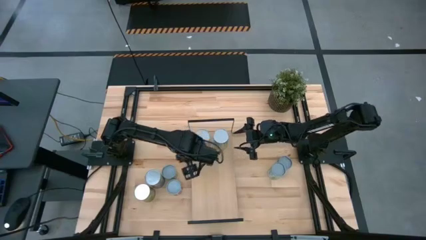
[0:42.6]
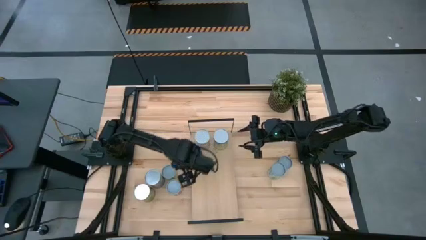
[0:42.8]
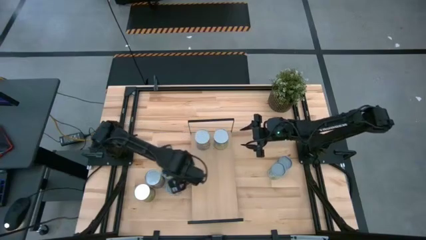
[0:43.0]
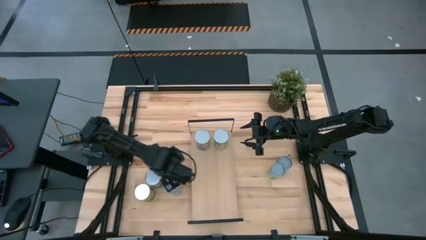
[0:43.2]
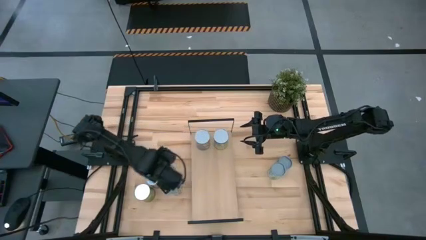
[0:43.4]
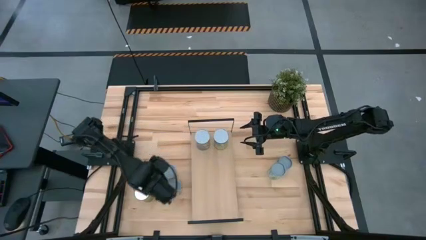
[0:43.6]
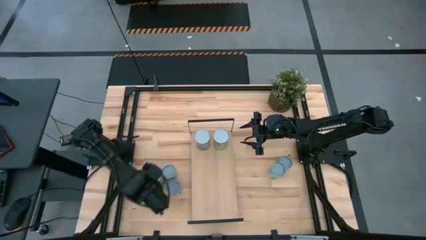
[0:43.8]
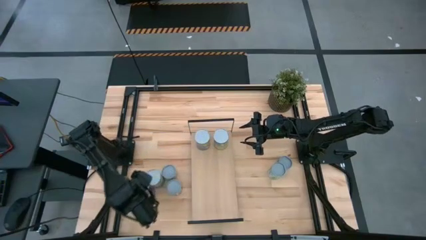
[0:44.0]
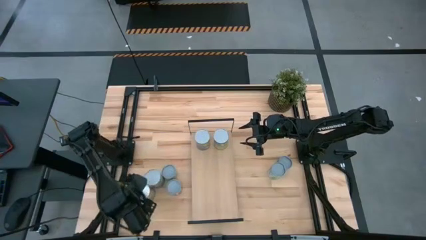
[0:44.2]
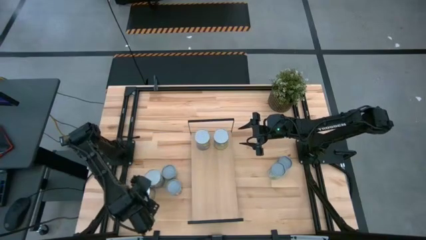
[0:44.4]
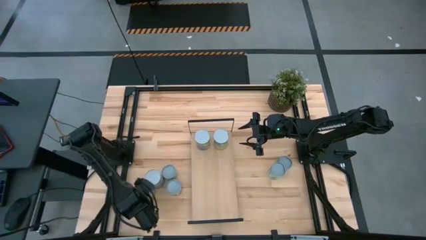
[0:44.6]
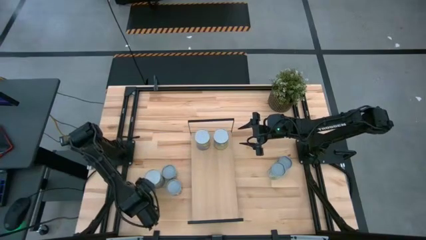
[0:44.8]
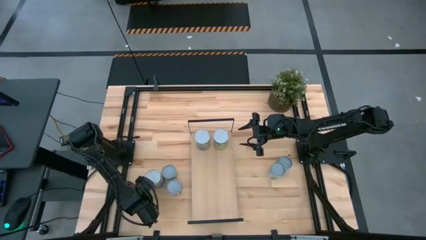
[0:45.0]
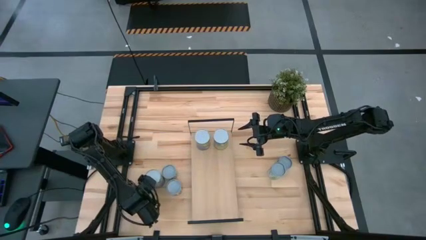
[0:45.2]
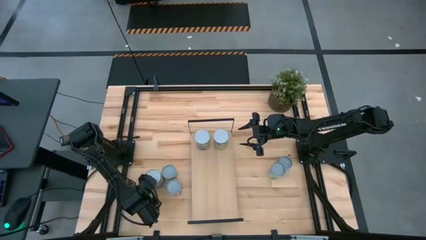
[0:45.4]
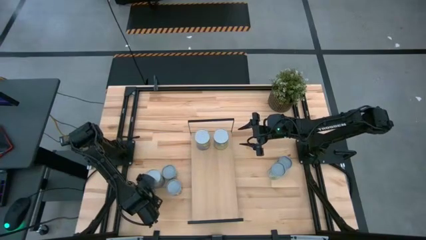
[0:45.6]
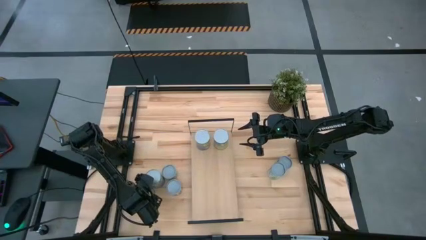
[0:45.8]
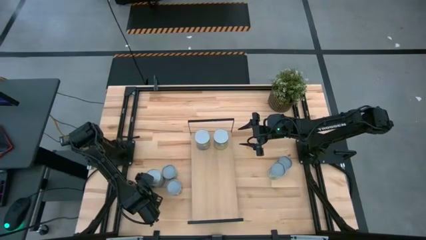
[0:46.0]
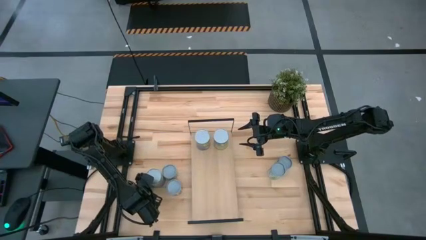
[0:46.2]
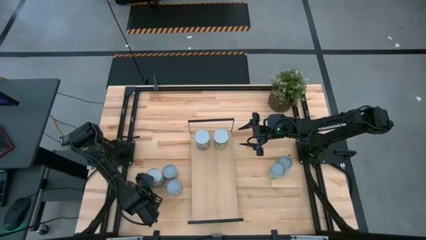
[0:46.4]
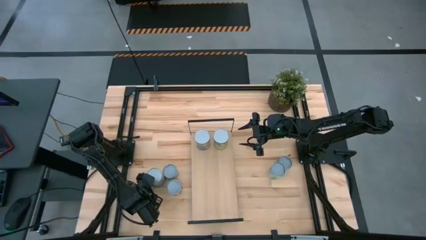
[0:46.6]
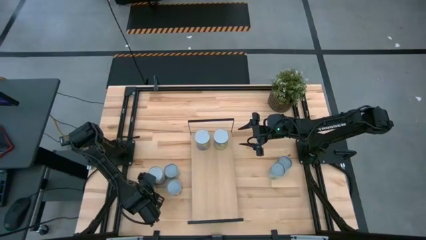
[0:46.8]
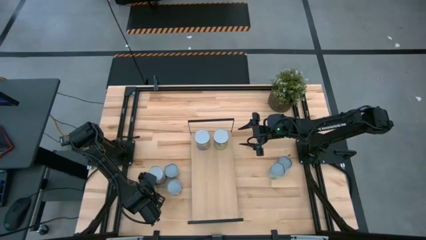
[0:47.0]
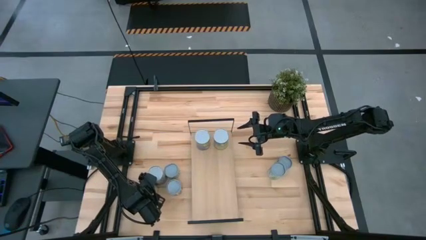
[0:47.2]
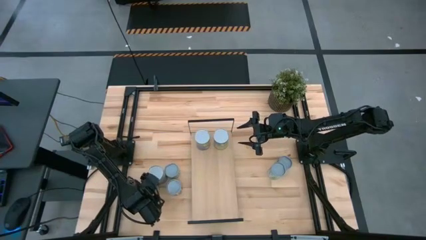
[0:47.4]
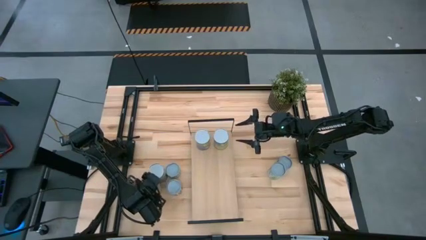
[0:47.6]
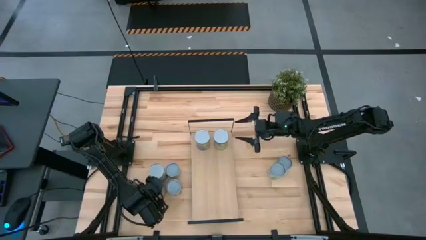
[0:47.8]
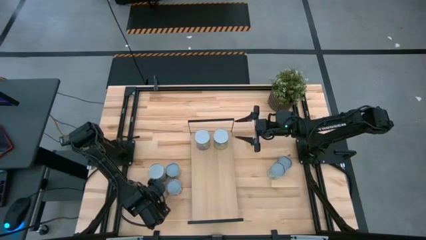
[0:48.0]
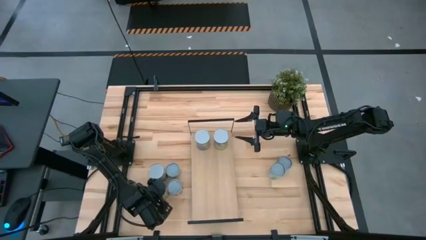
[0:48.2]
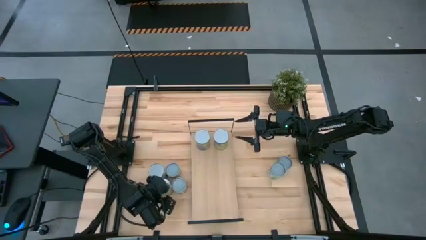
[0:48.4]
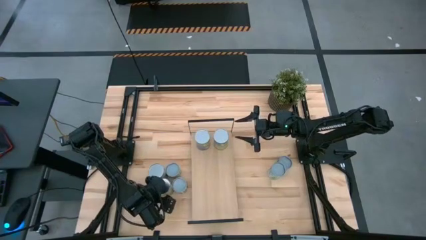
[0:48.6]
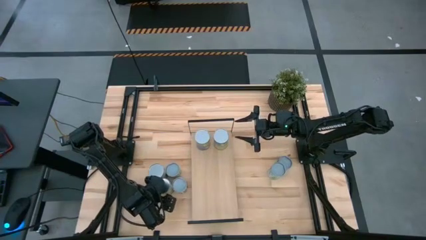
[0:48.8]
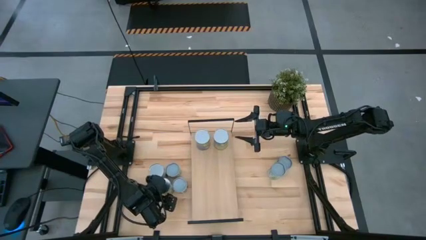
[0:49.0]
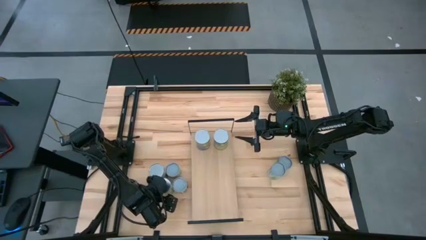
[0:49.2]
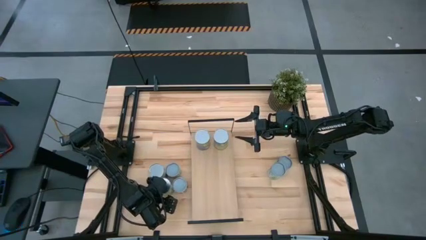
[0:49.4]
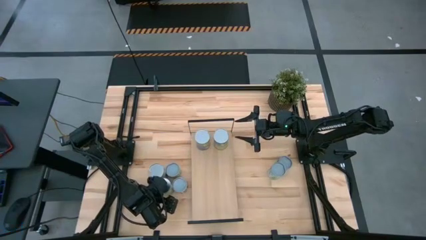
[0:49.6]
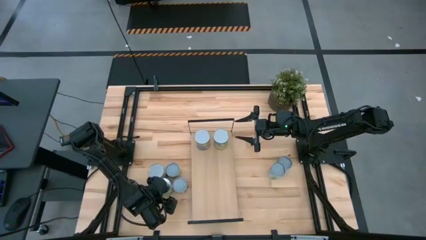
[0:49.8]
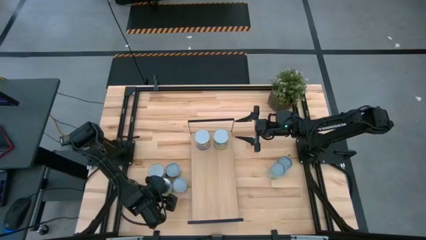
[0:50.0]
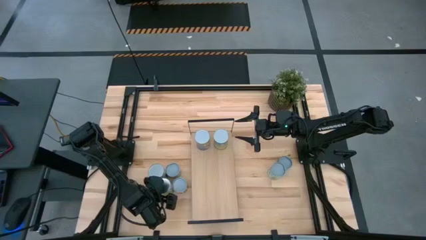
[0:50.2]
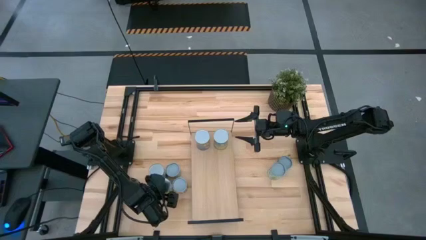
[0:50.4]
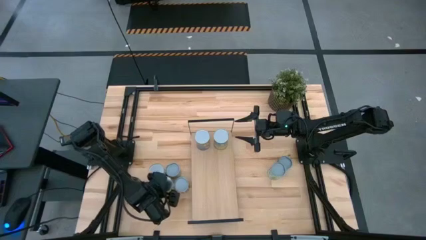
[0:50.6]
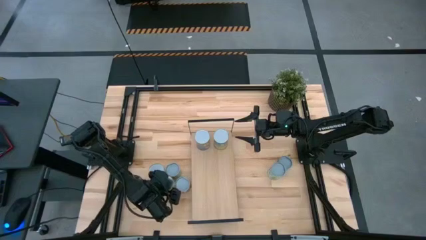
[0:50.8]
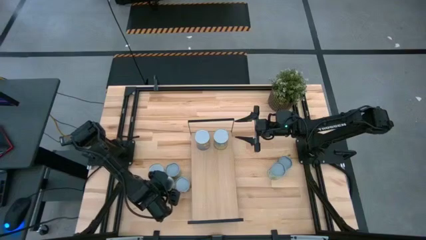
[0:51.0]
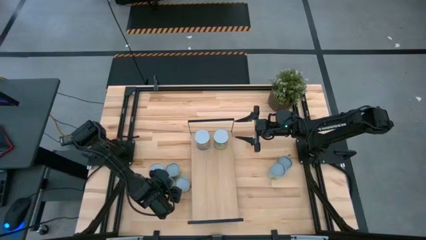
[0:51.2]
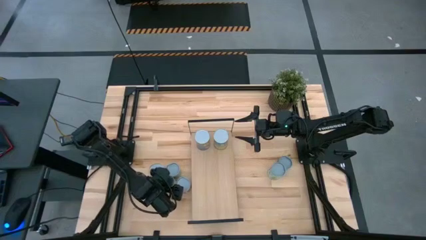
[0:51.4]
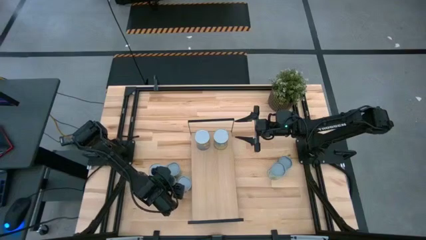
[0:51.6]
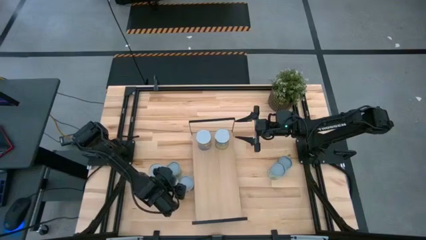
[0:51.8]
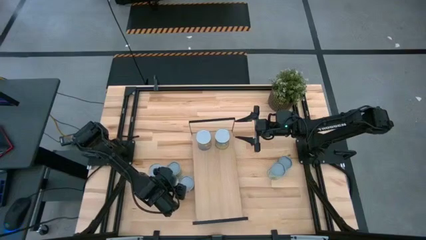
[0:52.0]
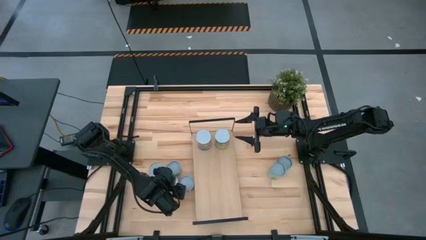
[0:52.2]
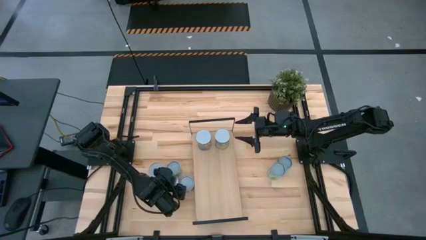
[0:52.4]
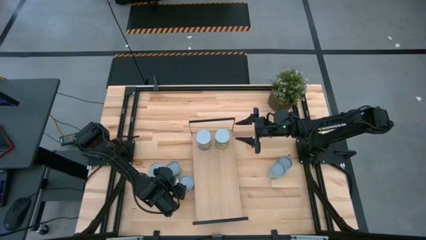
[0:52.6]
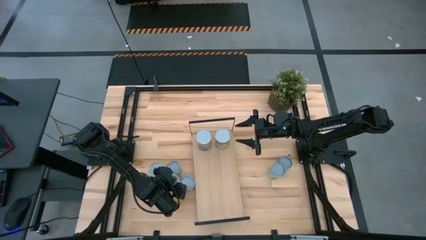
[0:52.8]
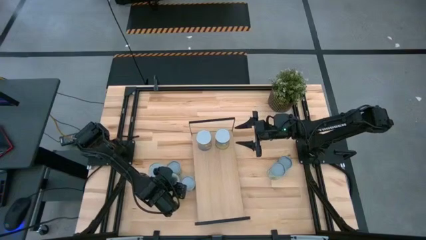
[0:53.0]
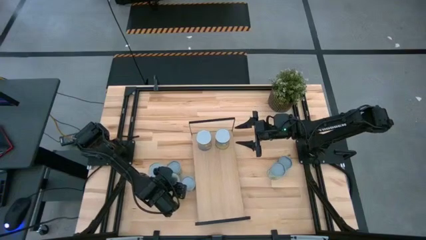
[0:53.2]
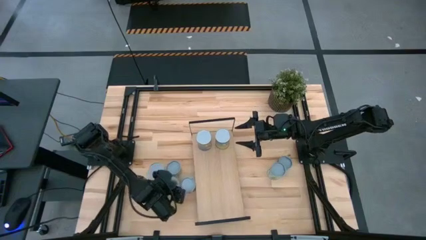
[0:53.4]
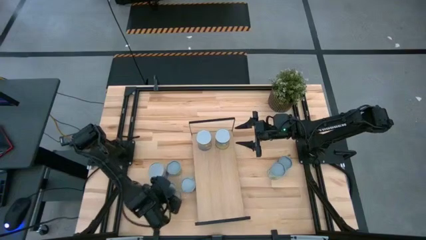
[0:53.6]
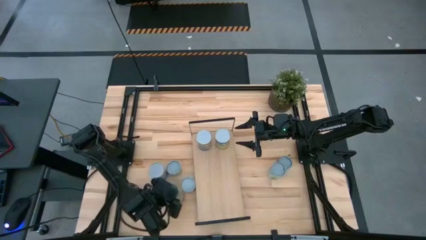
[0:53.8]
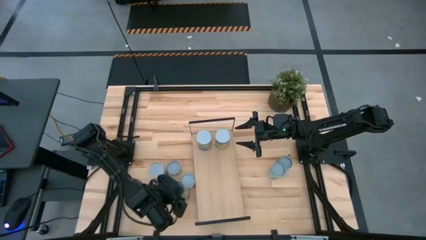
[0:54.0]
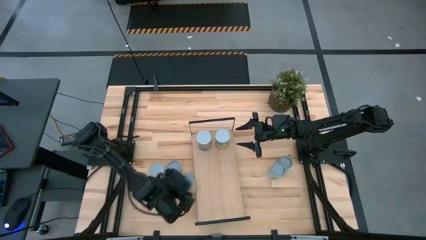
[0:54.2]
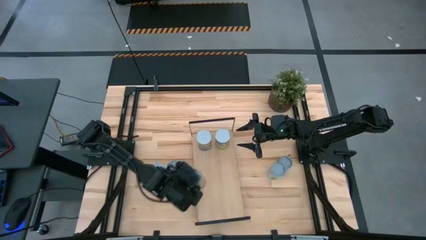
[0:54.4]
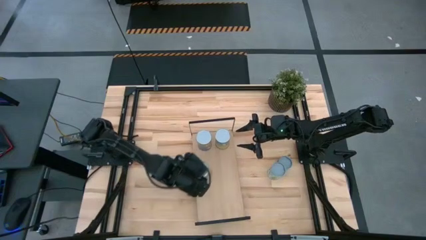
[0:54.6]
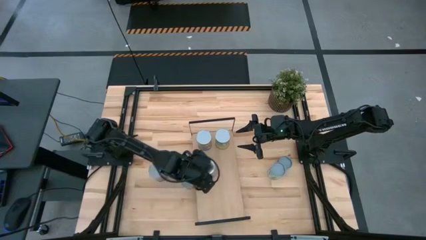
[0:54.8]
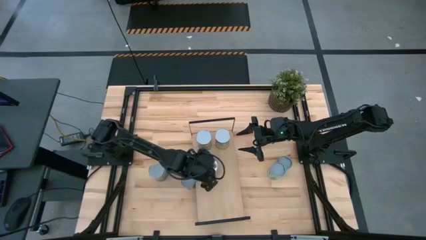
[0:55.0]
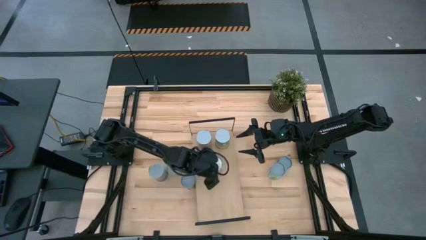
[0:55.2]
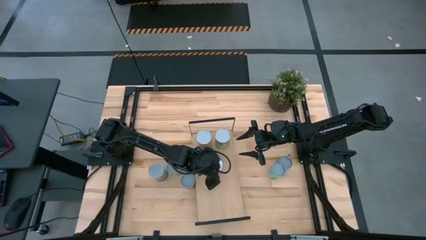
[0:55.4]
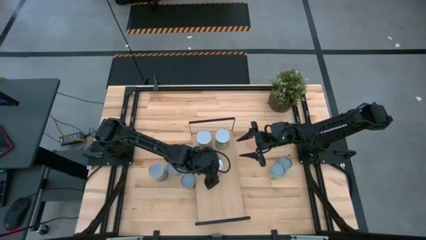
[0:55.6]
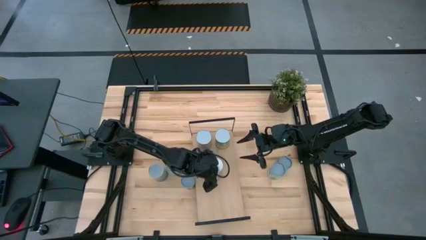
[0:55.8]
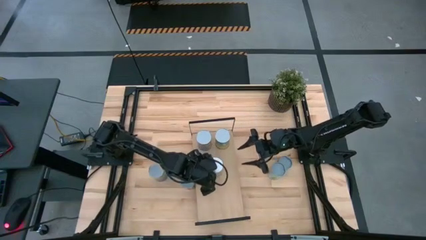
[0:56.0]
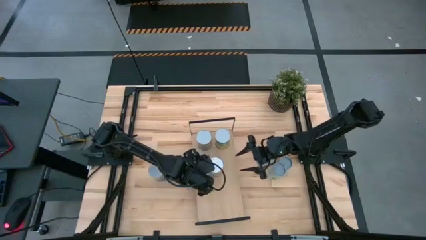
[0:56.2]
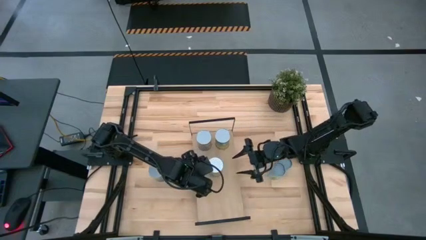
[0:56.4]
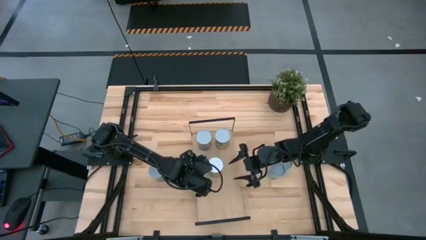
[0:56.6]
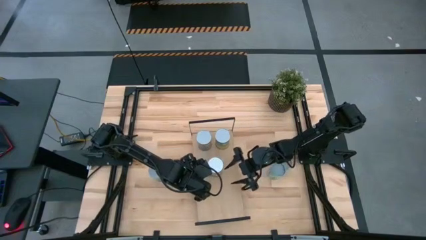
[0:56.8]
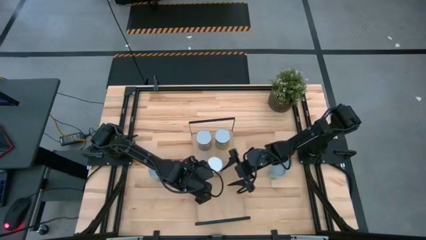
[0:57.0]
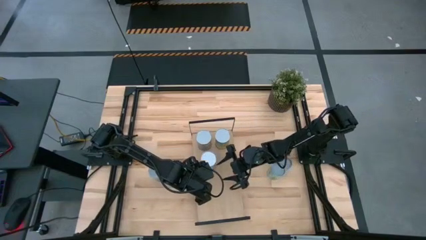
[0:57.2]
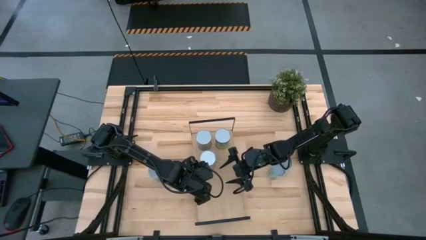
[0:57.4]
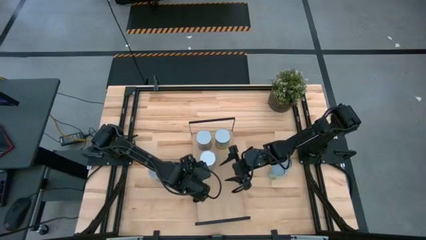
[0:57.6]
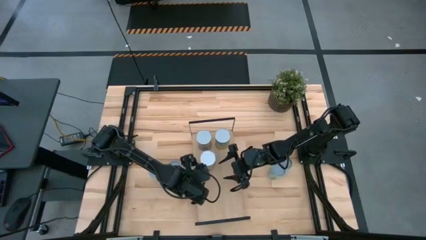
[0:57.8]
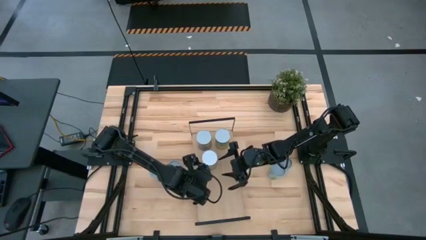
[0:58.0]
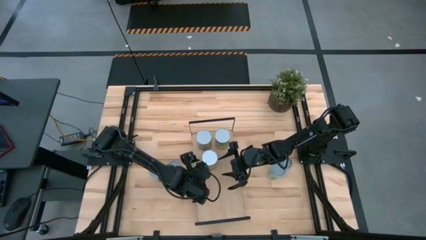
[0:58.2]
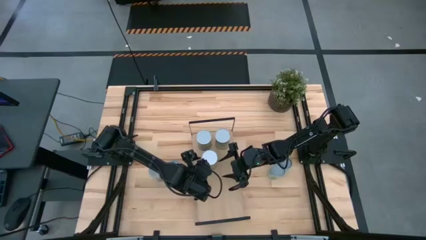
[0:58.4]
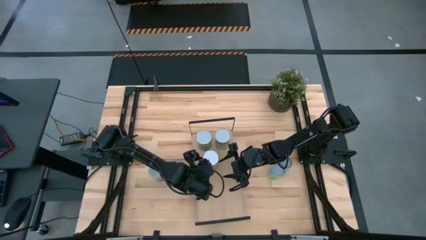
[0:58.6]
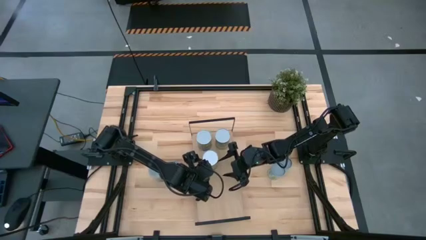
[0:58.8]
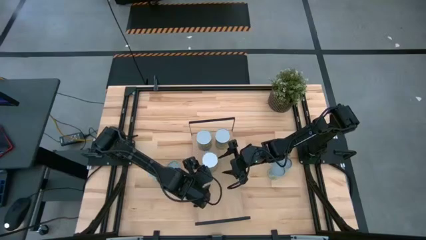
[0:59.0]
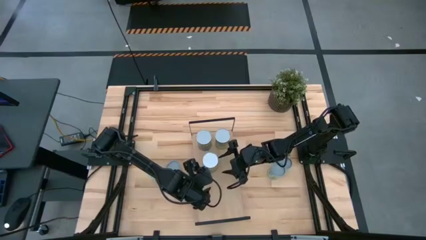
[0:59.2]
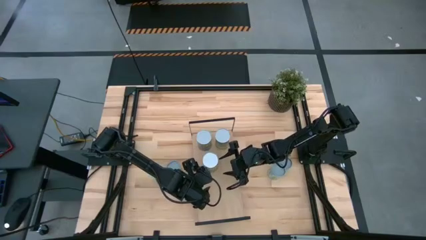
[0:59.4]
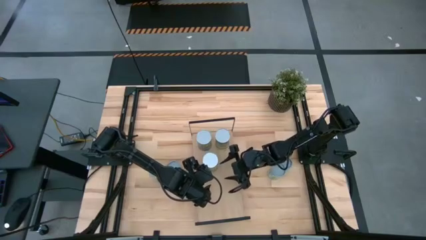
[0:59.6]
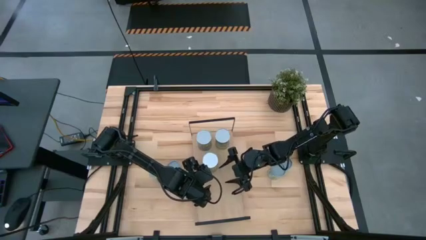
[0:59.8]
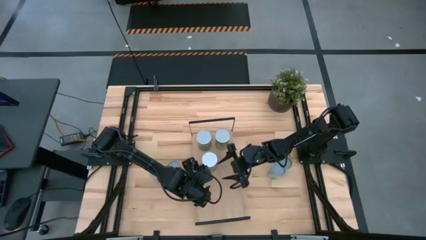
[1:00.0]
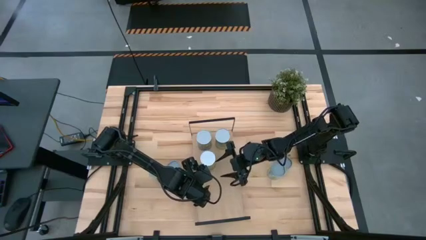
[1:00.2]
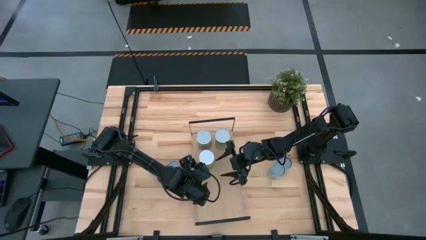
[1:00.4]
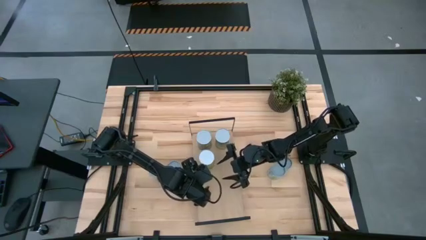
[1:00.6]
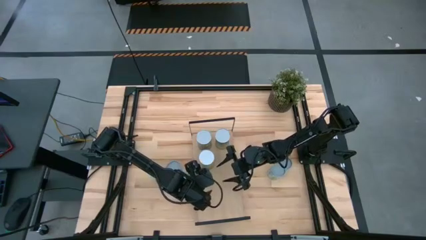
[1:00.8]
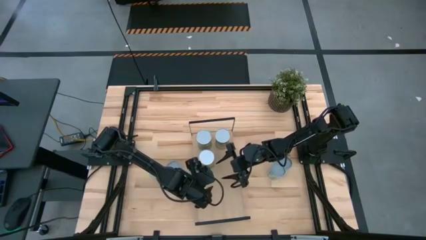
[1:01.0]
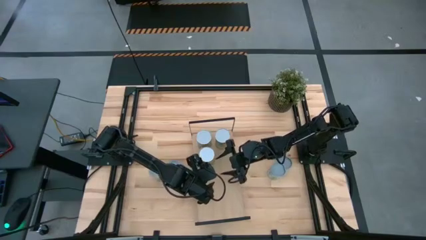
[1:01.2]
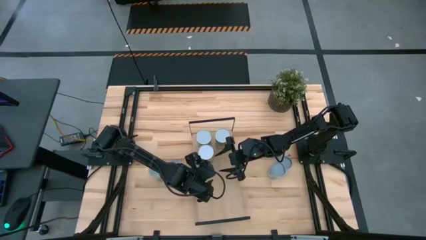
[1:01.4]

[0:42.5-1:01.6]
Task: Pick and place cans onto a shelf
Put the large canned oranges on the shelf
